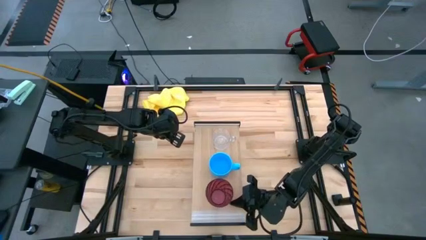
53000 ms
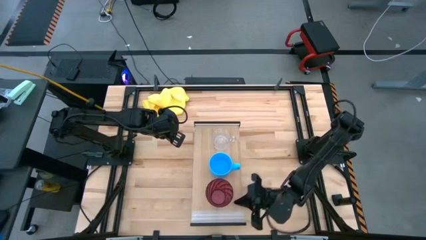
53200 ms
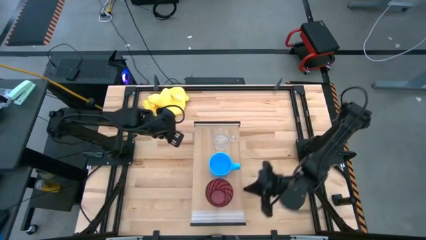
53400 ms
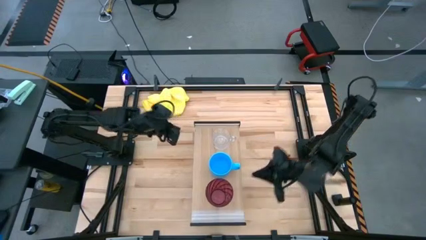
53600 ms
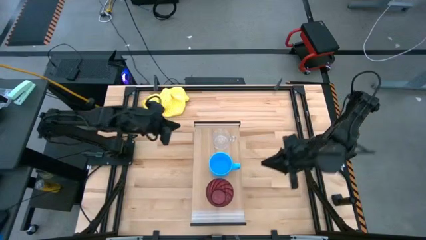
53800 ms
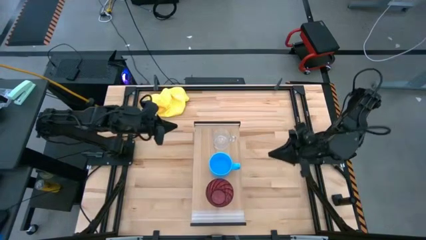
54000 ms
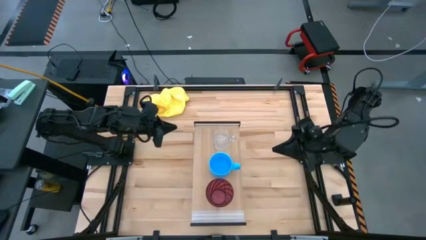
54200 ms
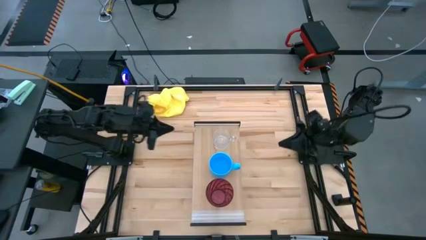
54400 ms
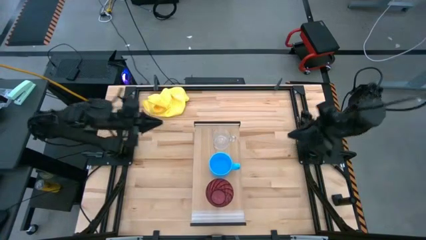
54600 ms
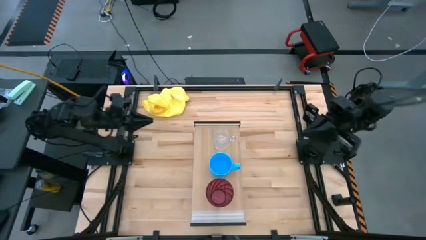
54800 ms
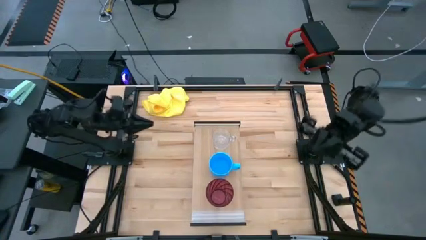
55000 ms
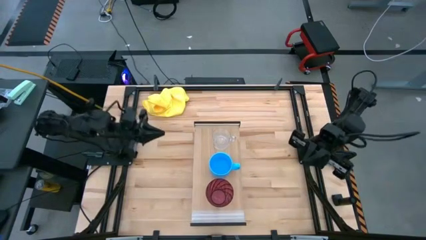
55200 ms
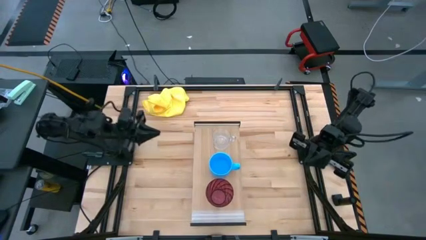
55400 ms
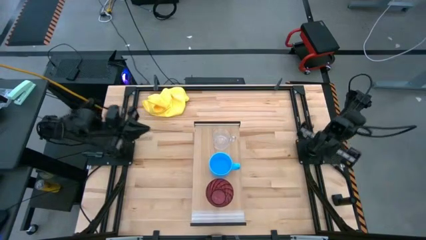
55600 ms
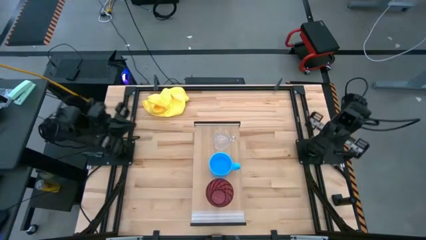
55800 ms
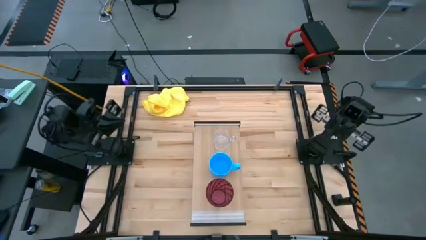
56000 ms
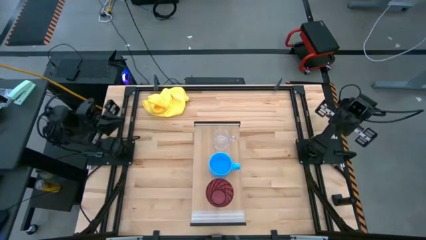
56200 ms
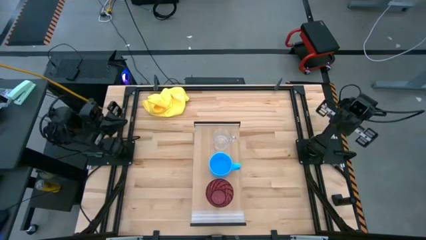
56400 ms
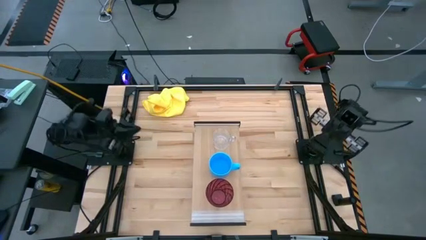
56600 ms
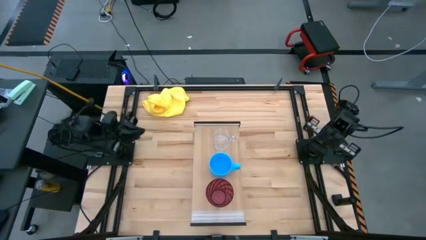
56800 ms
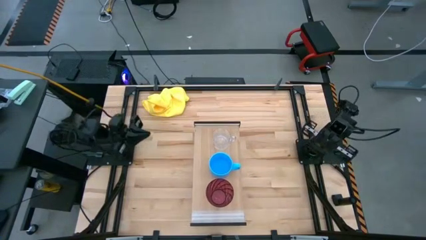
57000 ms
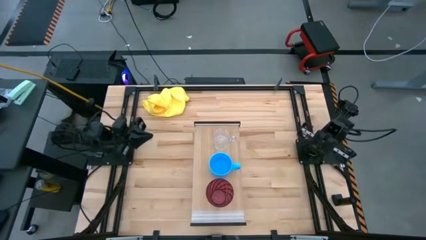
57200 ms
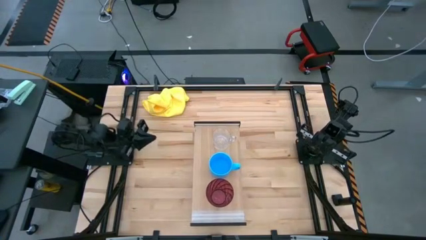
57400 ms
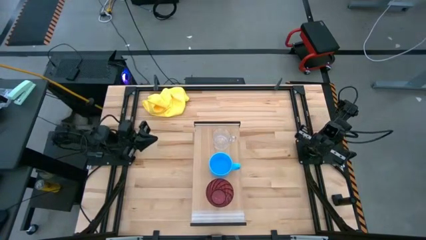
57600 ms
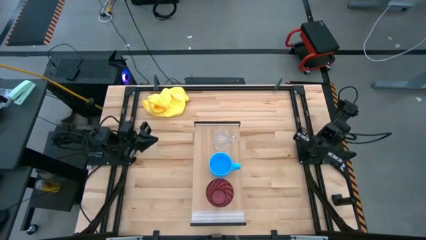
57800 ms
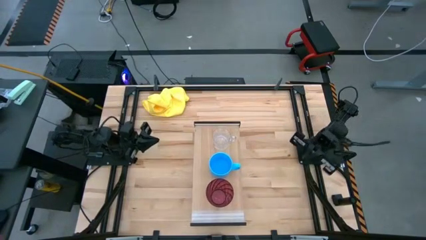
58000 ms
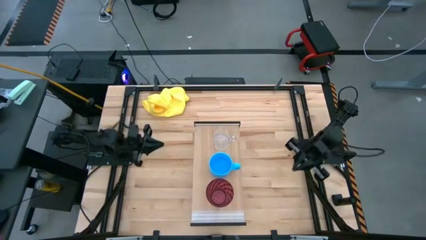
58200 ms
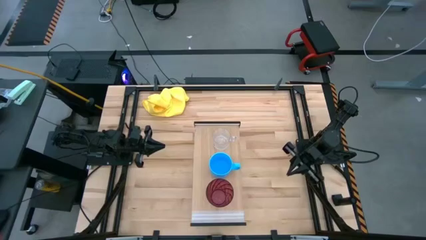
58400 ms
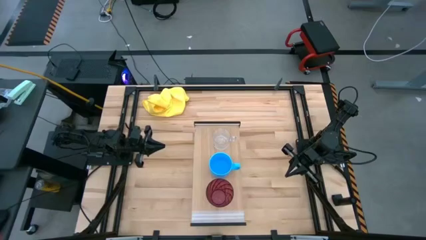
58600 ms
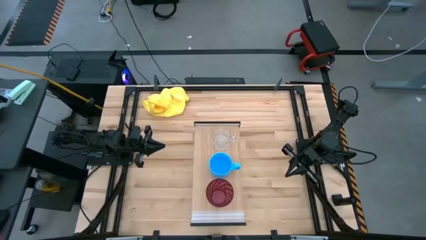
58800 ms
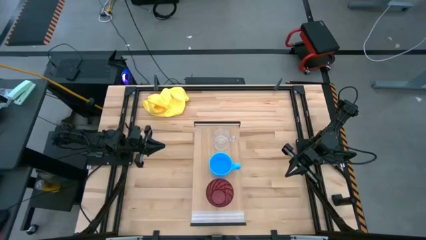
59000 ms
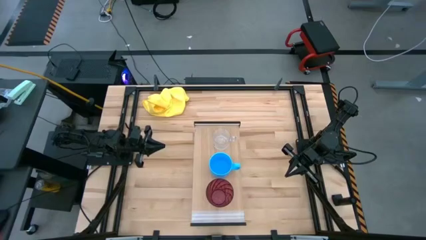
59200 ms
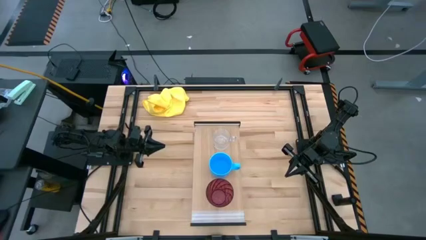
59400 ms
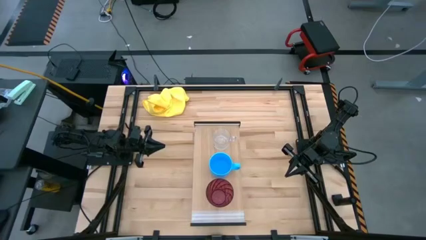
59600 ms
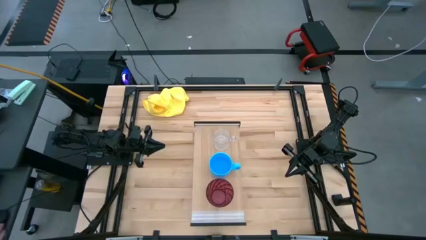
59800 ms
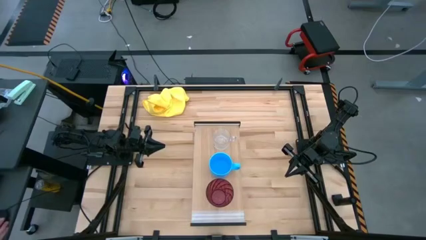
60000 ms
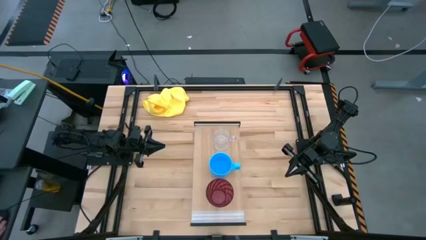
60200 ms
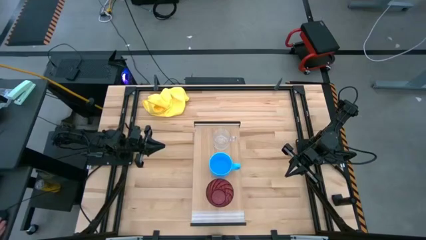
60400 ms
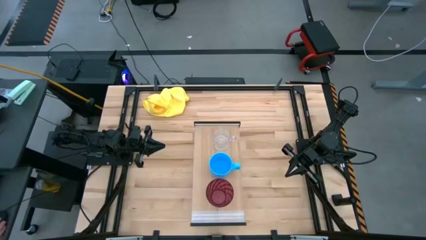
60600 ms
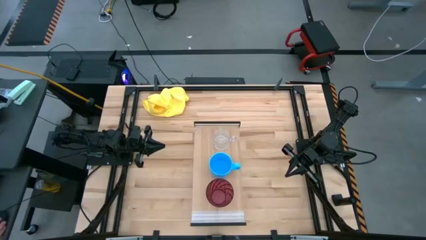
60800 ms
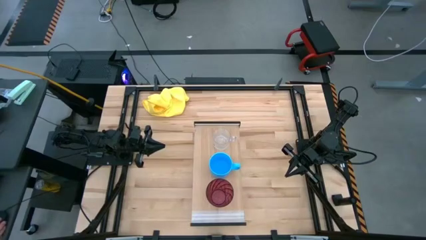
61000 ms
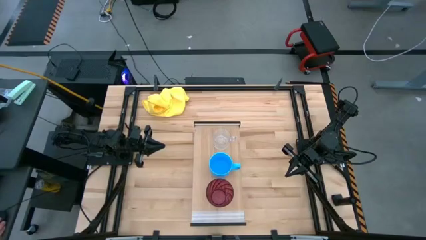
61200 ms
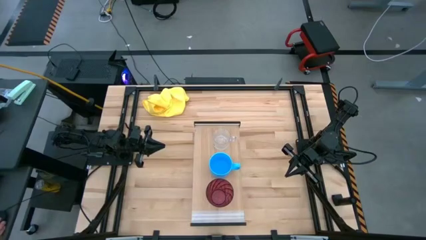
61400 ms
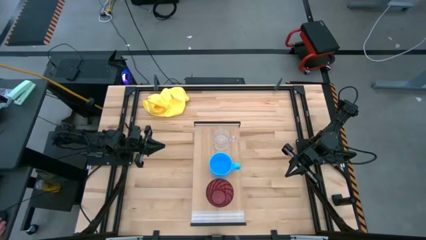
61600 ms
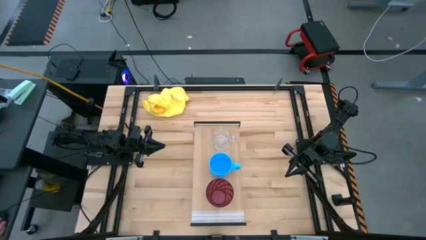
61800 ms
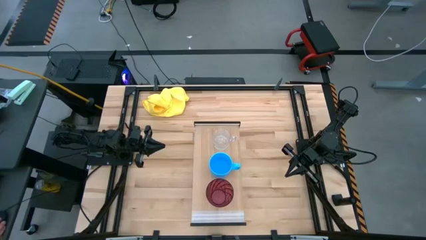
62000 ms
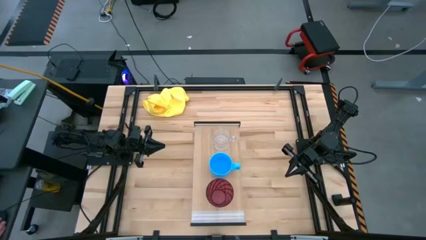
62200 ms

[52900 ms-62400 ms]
Task: Stack small to large cups/mugs on shelf
Return to Home Position
